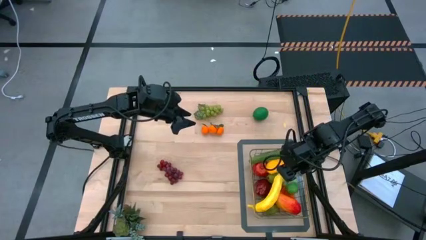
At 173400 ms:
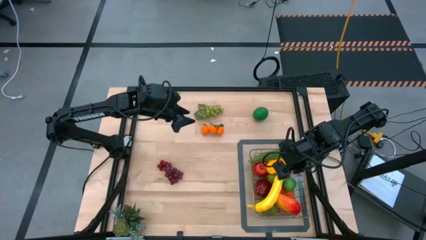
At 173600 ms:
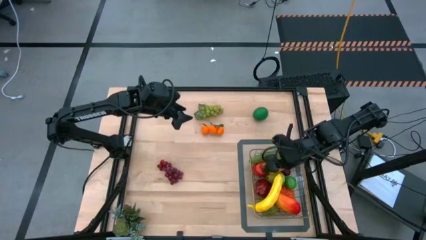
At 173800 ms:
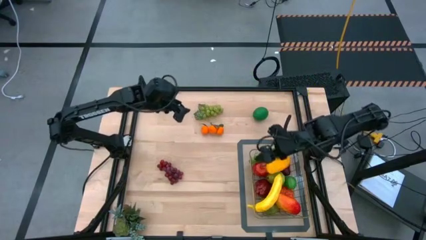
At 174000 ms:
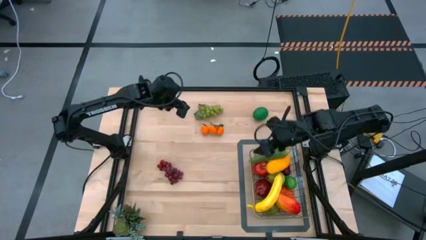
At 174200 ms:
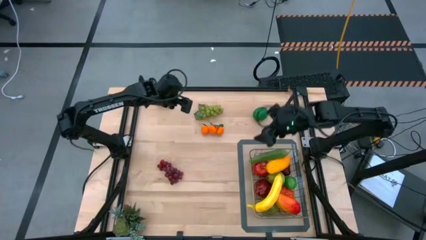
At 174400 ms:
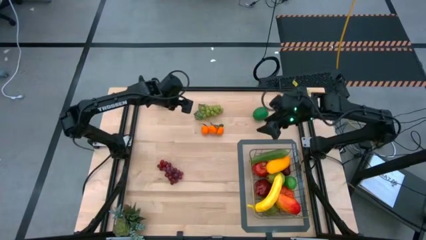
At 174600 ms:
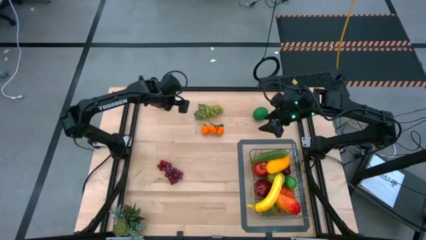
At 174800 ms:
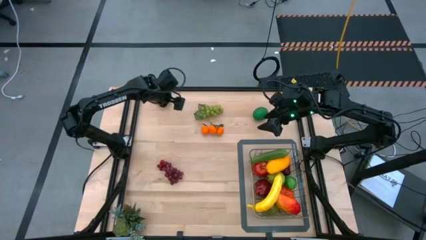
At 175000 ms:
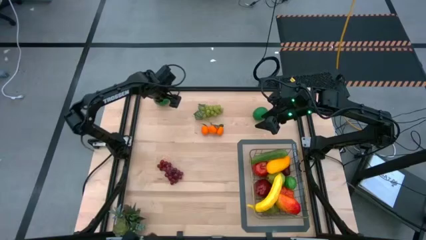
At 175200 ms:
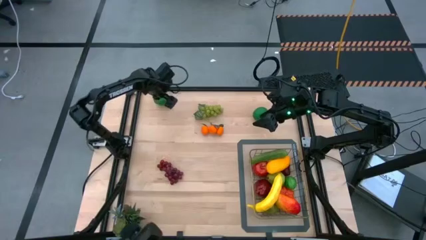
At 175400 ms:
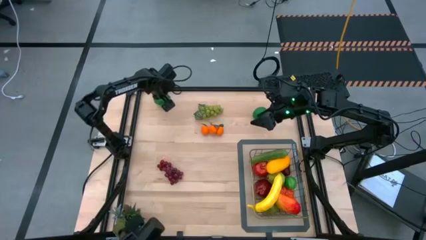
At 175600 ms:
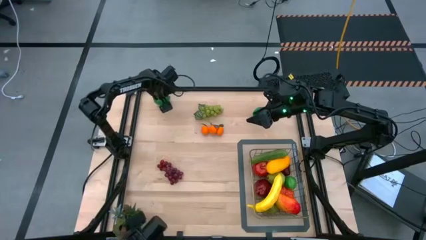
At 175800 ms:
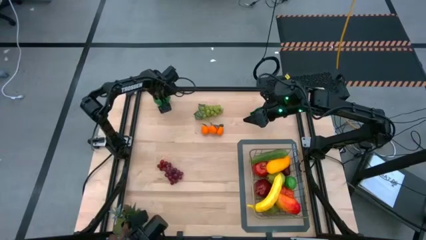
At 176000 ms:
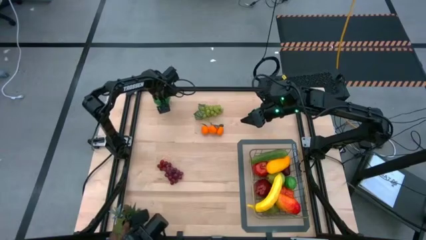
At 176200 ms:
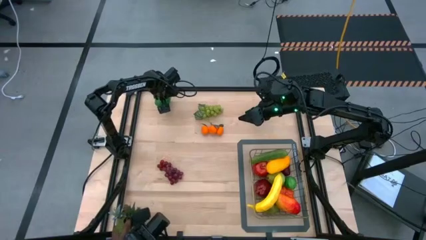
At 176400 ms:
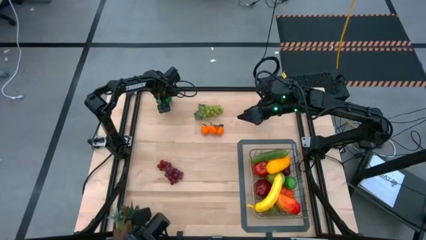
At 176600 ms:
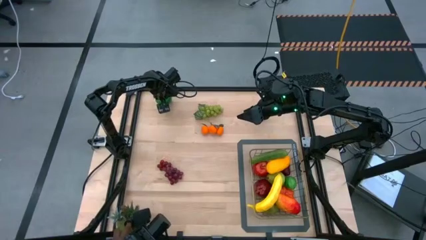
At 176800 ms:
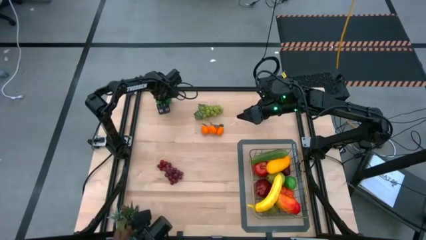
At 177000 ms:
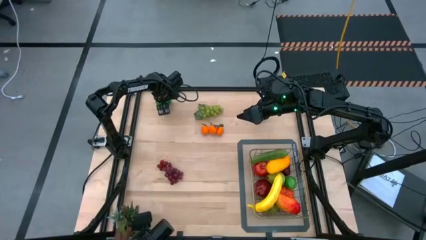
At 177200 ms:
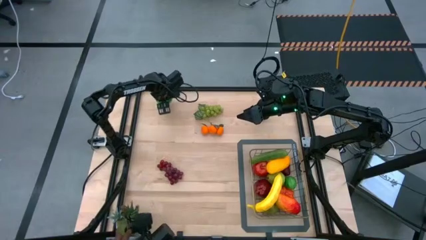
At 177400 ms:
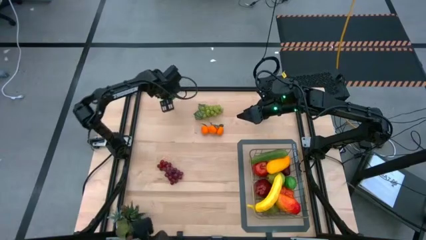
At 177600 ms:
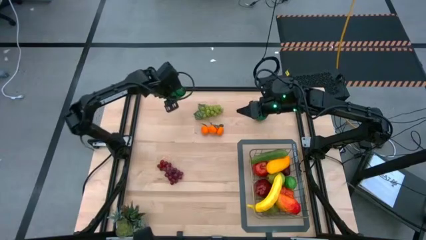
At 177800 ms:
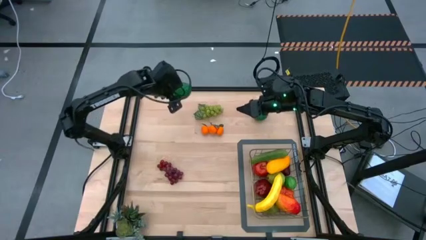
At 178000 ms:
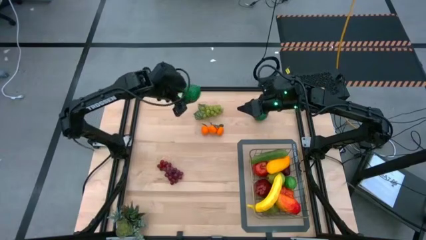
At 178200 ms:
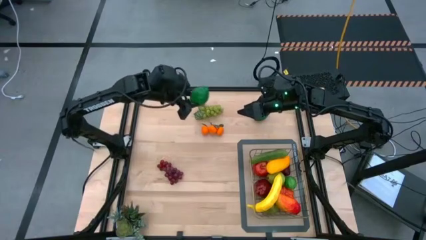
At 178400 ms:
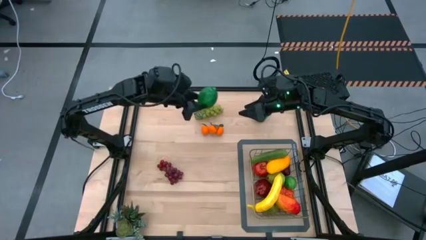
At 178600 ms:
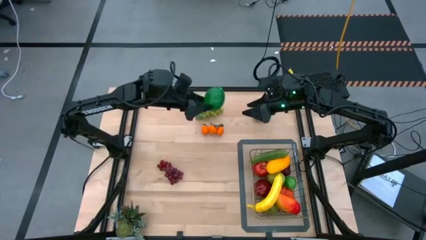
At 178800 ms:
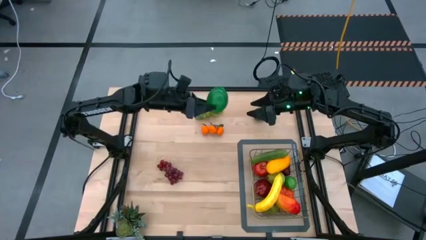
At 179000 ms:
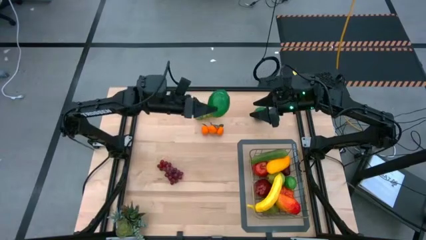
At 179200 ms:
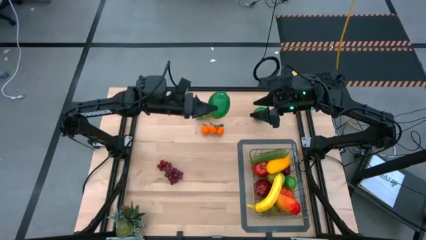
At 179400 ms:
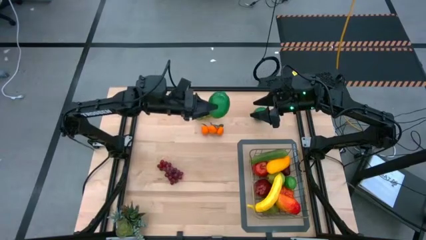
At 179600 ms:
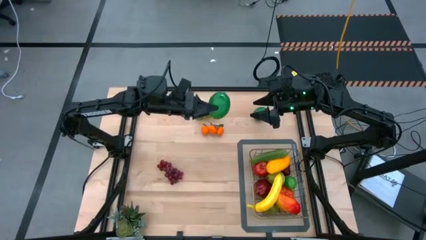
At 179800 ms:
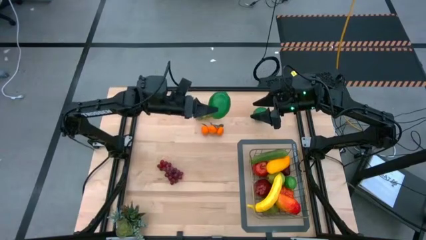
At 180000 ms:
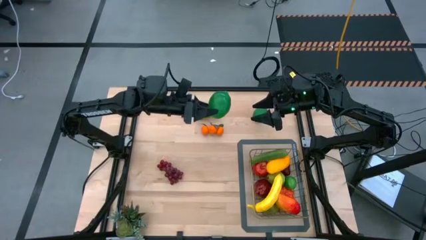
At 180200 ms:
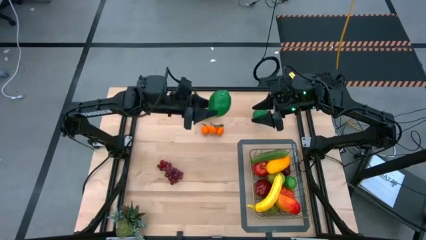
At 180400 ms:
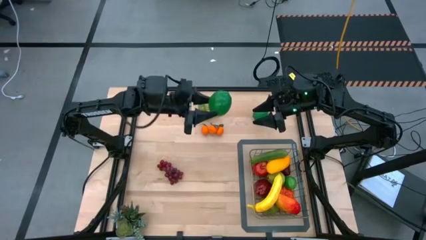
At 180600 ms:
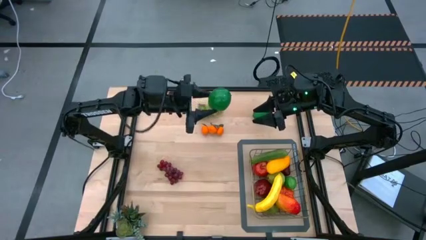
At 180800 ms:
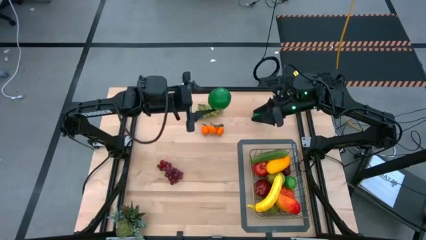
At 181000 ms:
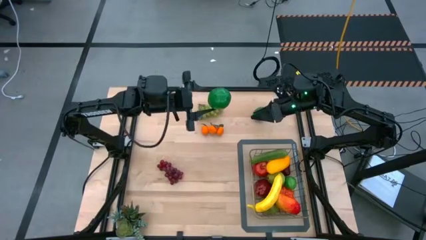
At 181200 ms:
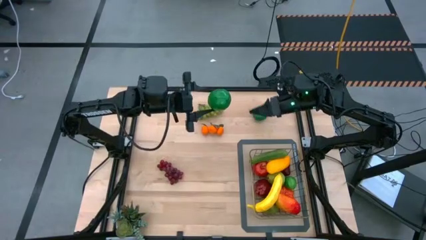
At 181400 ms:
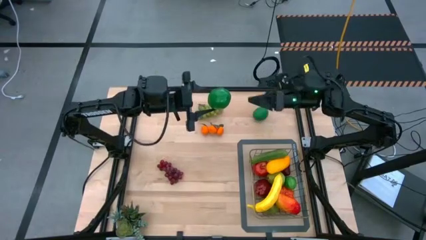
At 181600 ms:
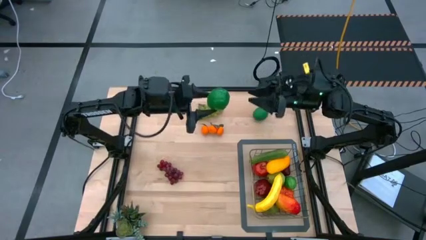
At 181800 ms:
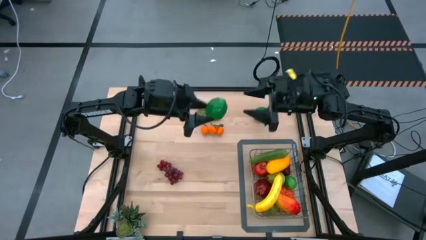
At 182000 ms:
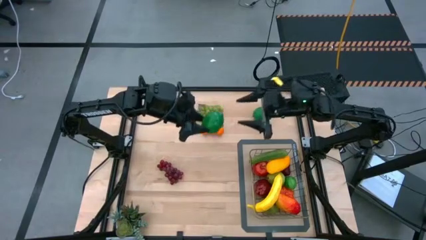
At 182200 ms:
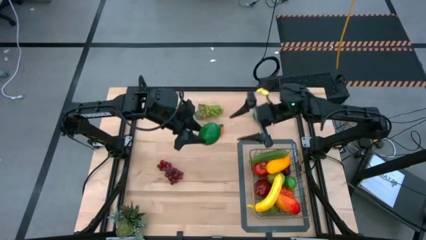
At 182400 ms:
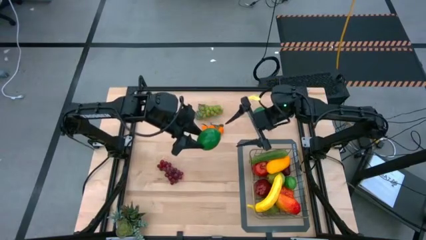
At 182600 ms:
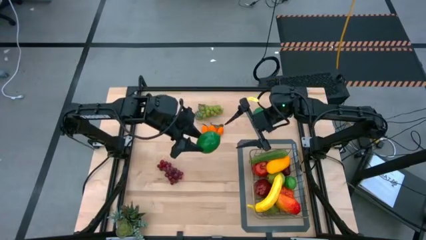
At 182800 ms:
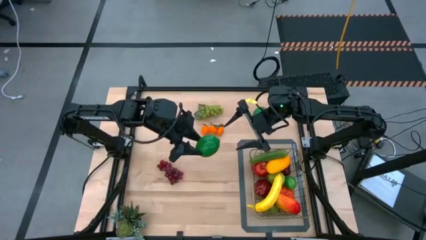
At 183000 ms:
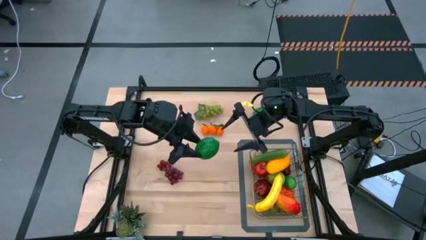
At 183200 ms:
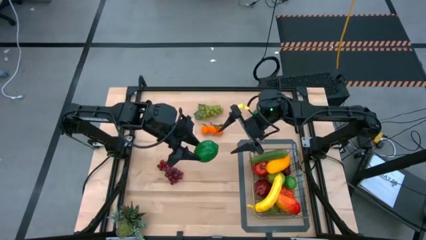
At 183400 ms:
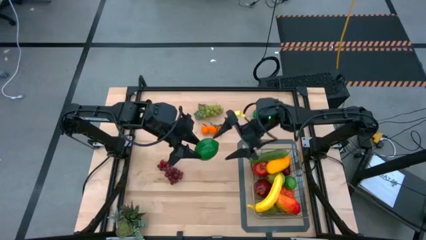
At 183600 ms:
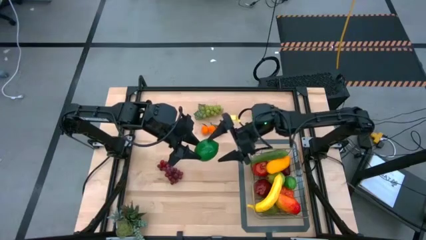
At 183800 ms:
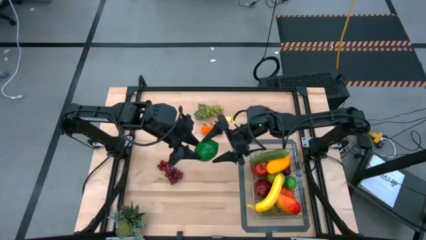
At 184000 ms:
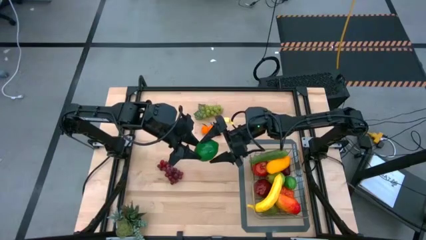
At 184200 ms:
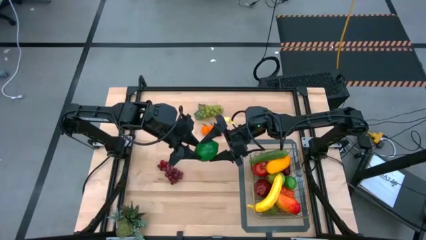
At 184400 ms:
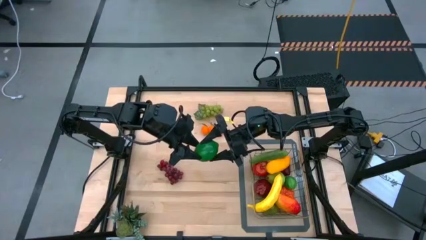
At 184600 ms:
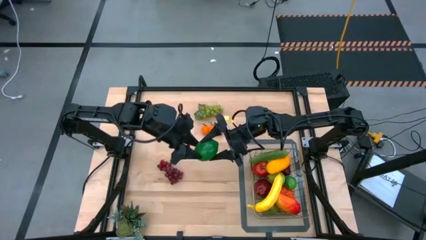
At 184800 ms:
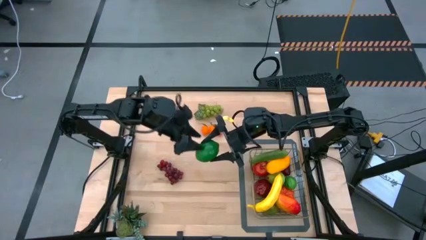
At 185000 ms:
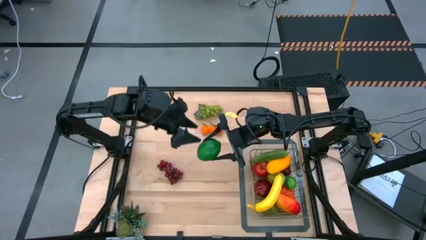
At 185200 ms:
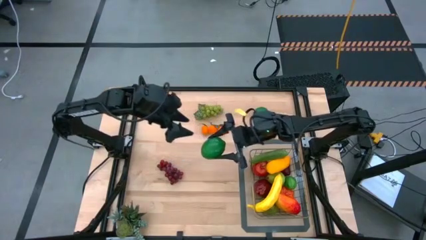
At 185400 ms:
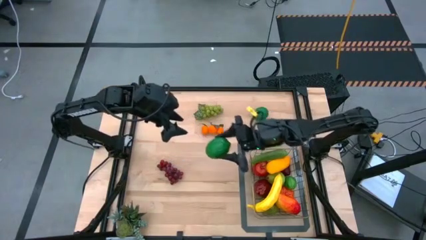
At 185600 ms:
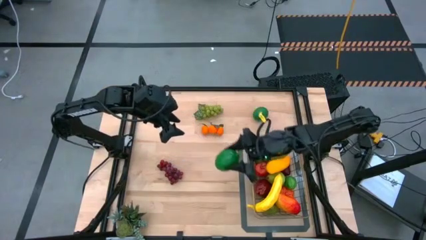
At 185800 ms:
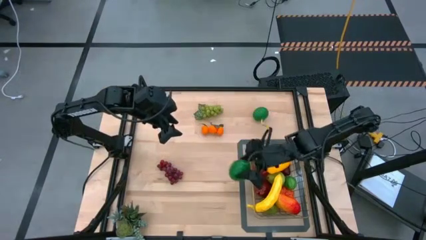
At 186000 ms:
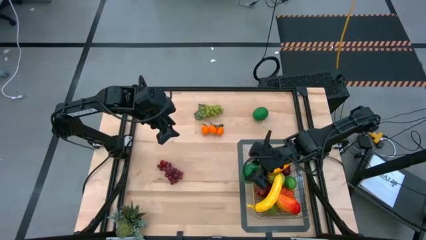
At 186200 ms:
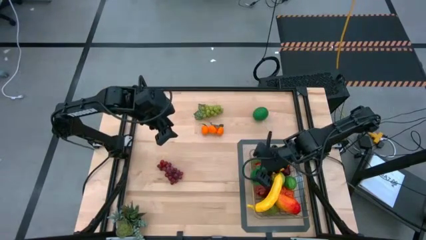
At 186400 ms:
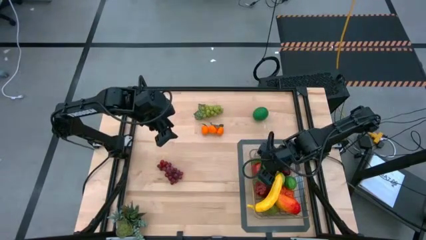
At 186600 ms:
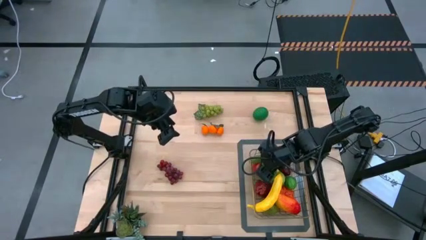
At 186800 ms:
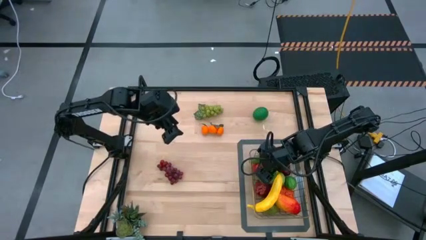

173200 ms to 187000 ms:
Task: Build produce basket
Put the left green lime into the wire basket

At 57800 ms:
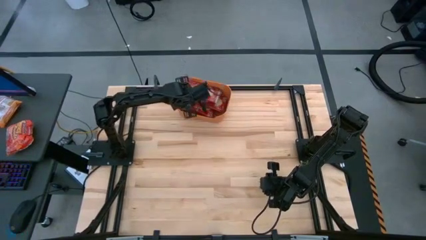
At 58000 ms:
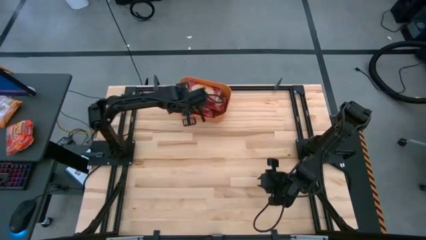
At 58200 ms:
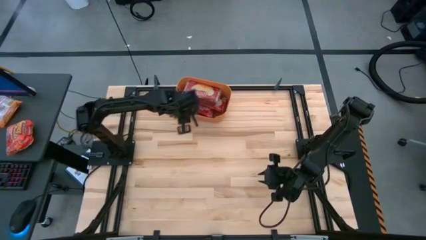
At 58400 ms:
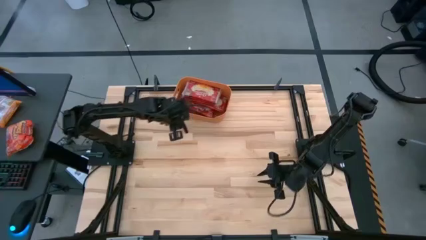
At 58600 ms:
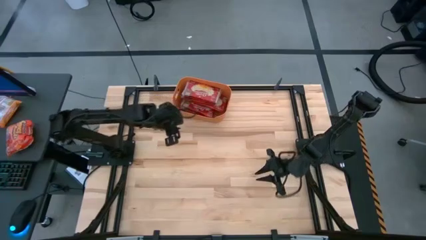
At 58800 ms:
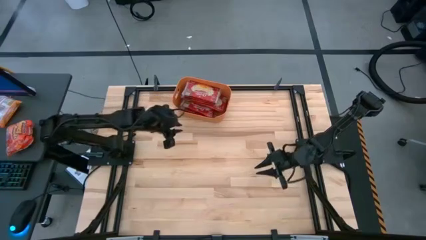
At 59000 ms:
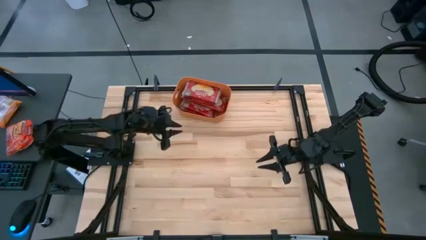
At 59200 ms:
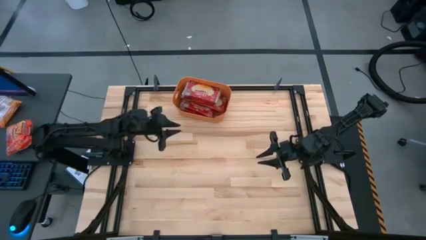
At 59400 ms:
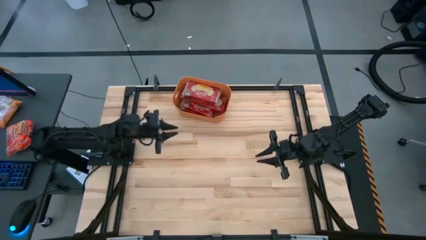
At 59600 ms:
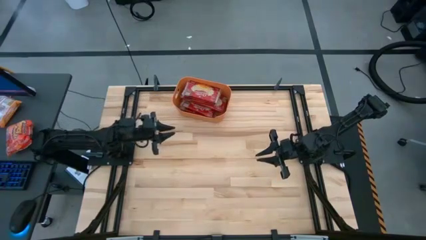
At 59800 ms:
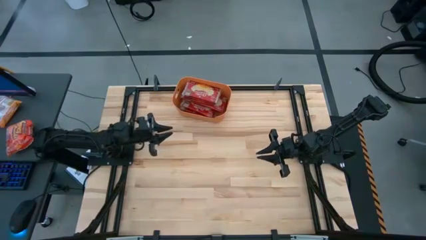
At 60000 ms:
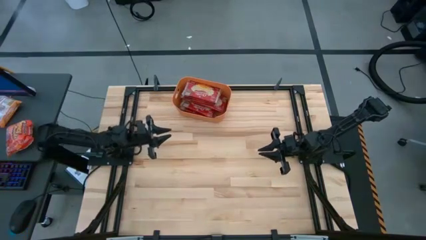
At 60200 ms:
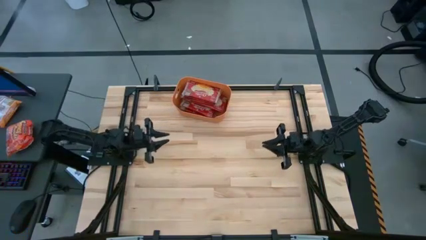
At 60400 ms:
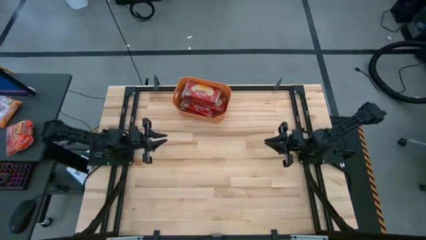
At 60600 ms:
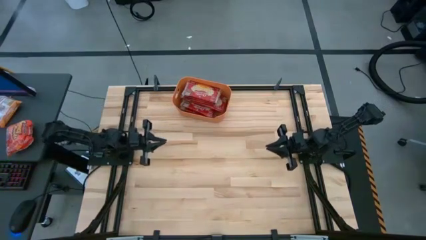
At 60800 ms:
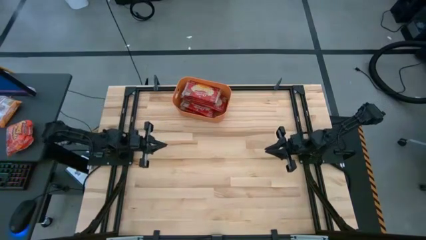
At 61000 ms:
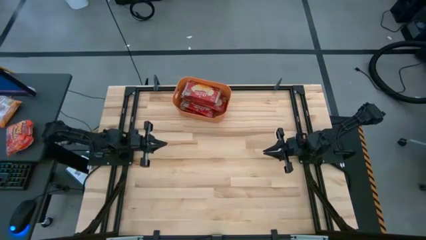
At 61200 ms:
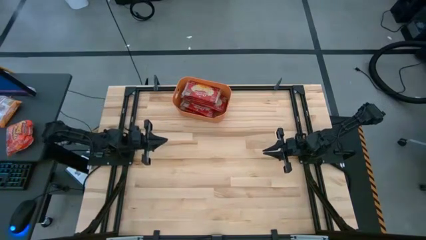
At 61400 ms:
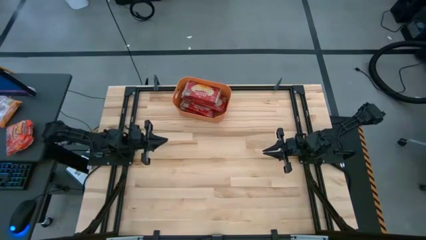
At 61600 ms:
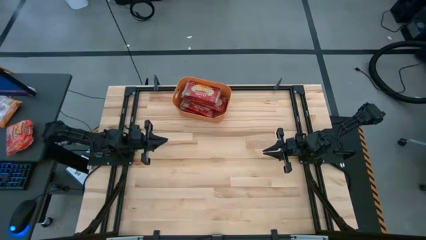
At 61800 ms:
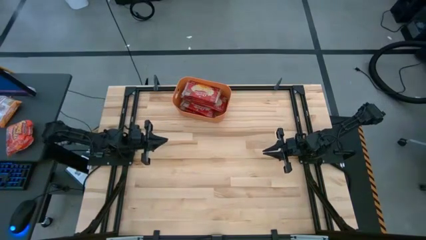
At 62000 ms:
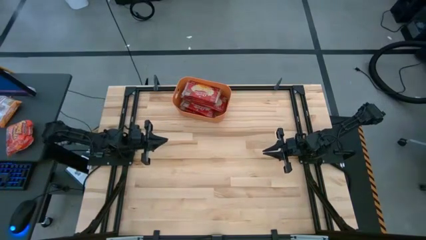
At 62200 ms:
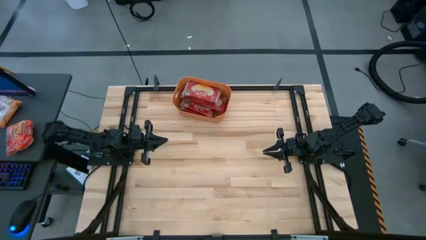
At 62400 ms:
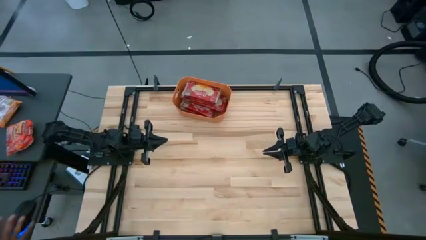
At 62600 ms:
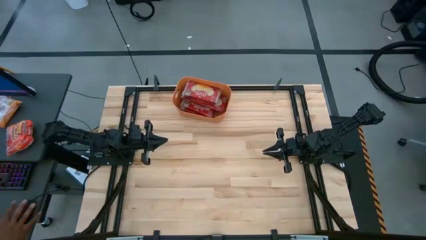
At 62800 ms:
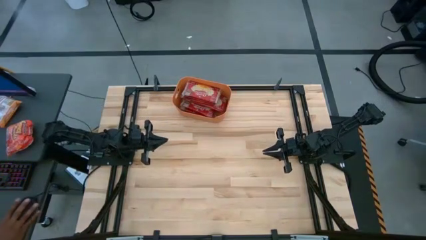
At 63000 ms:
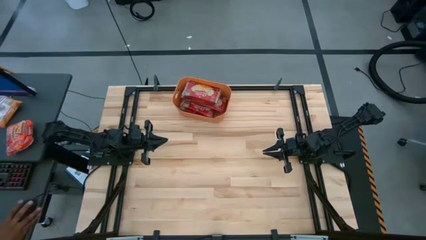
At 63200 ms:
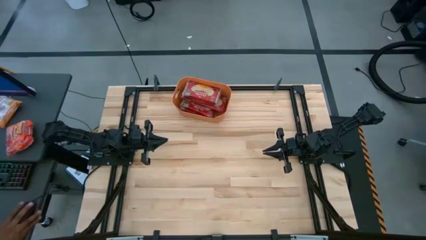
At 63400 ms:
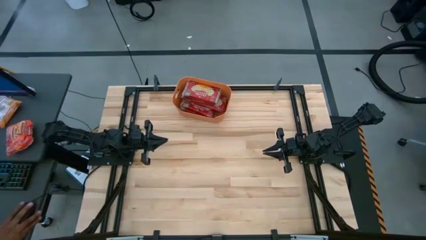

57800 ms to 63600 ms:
Task: Sort popcorn bags into baskets
Return to Home Position
